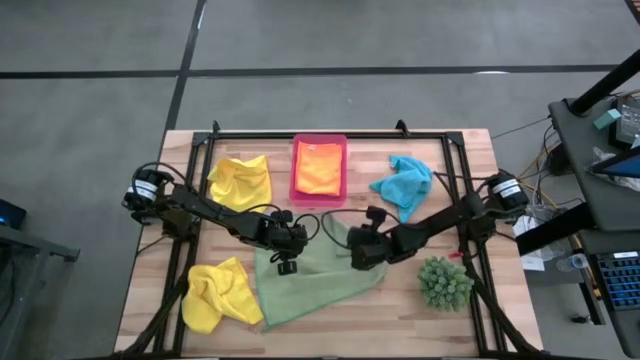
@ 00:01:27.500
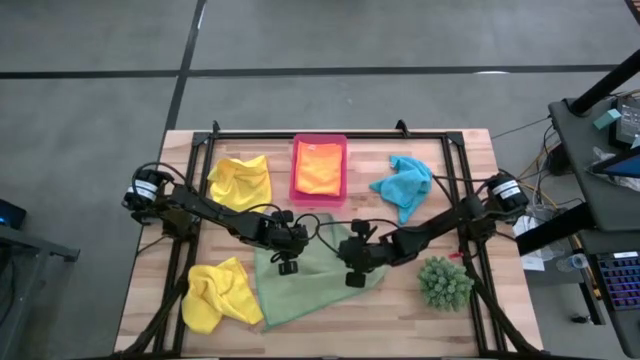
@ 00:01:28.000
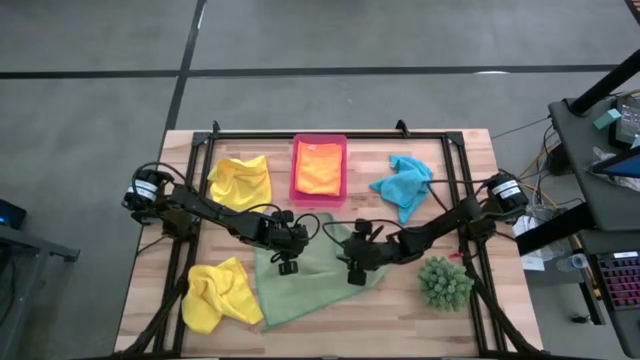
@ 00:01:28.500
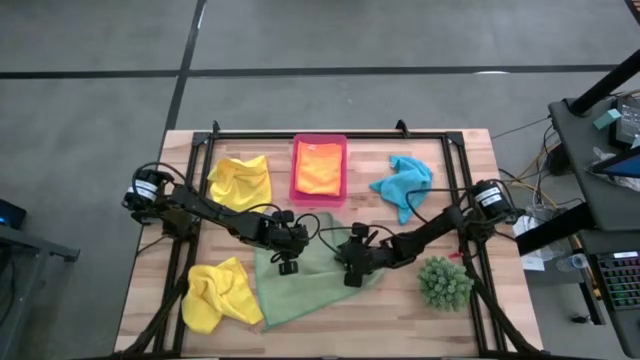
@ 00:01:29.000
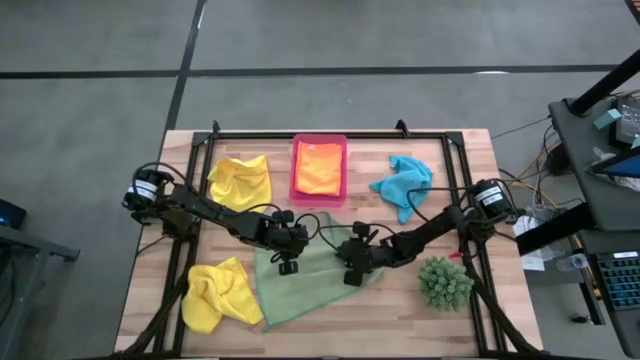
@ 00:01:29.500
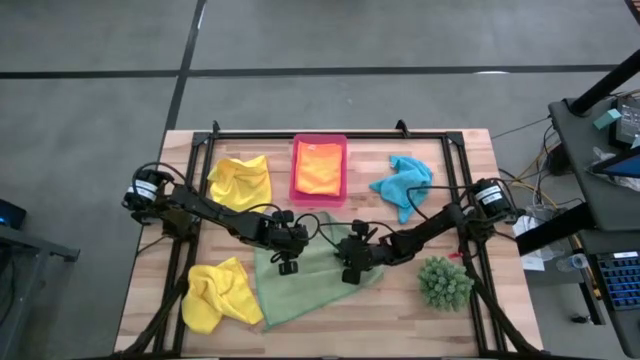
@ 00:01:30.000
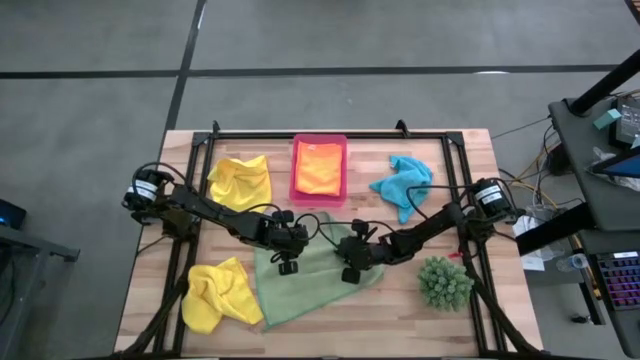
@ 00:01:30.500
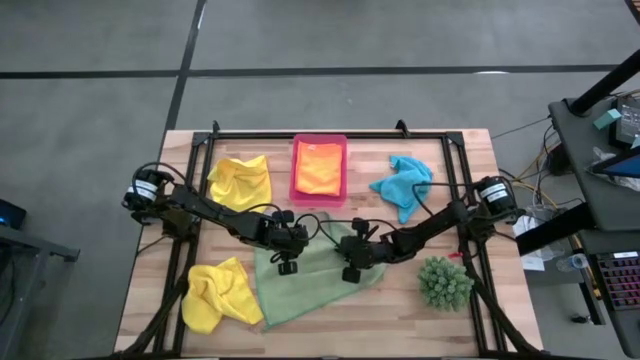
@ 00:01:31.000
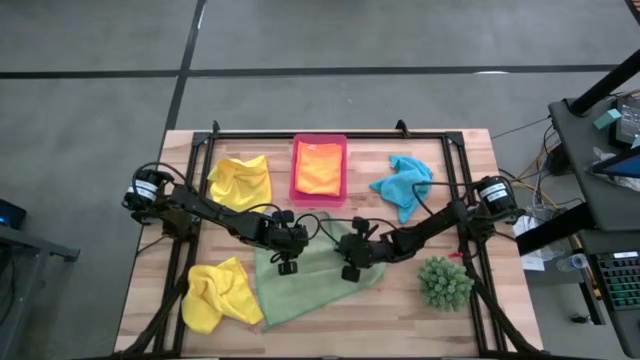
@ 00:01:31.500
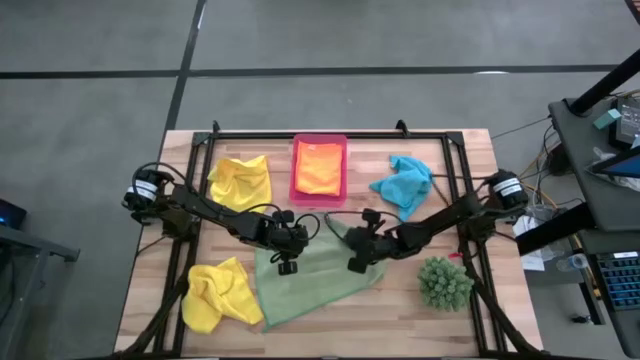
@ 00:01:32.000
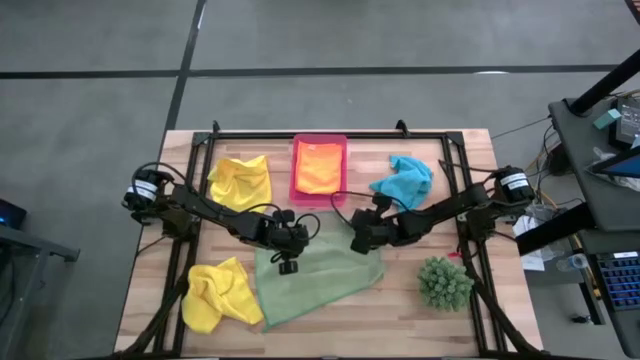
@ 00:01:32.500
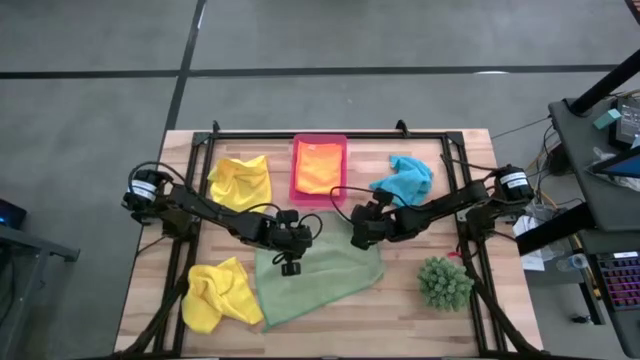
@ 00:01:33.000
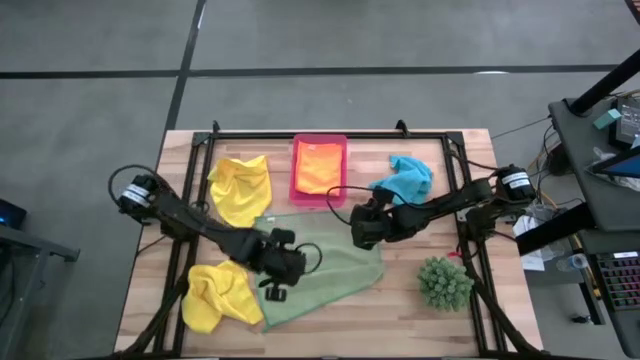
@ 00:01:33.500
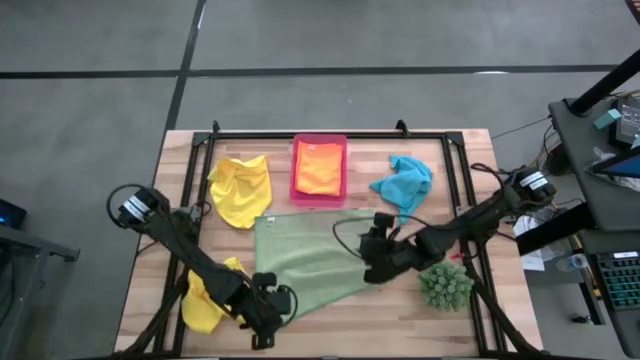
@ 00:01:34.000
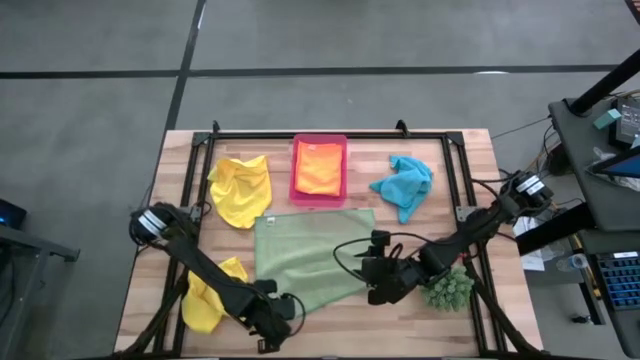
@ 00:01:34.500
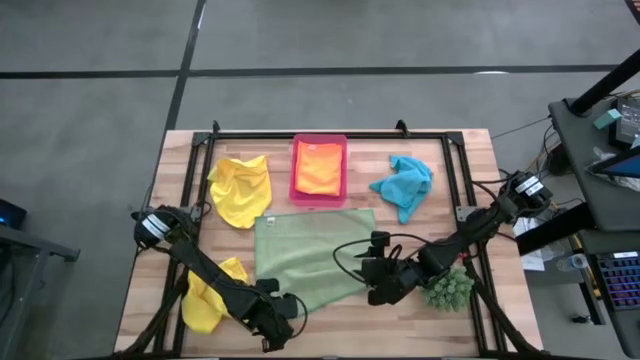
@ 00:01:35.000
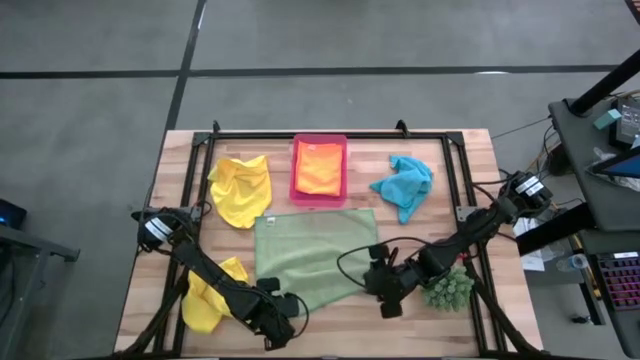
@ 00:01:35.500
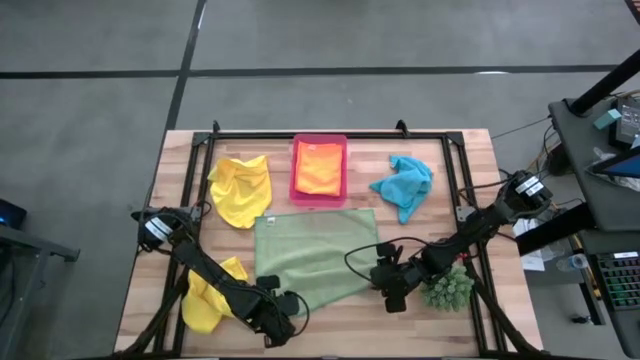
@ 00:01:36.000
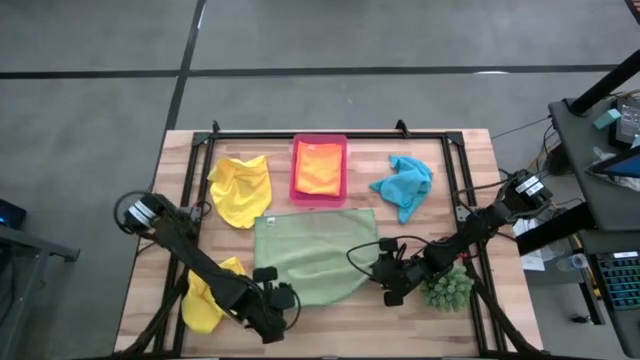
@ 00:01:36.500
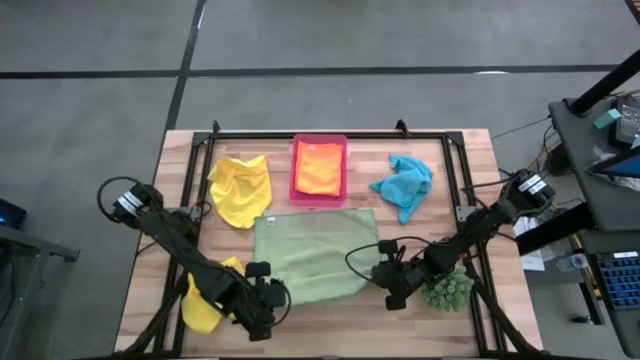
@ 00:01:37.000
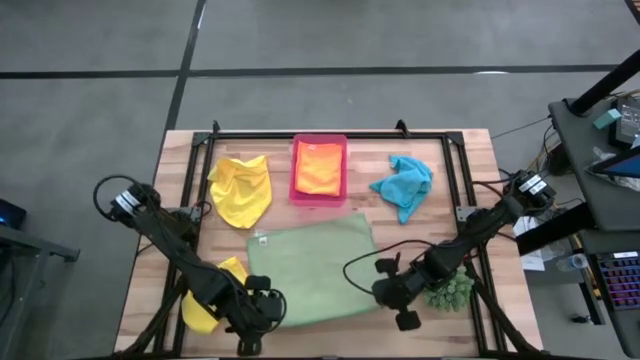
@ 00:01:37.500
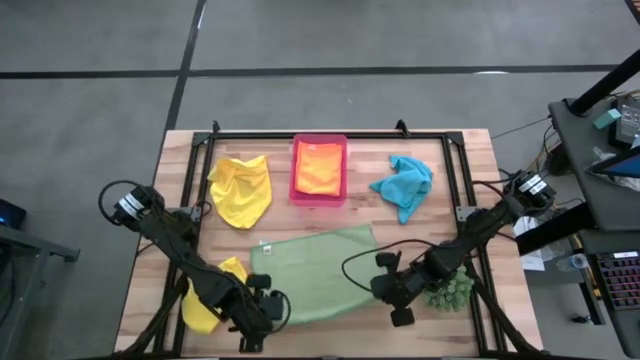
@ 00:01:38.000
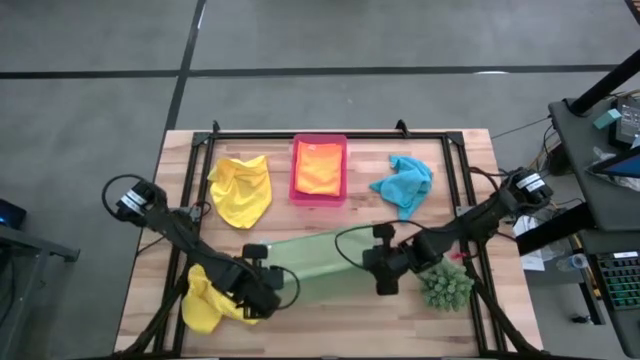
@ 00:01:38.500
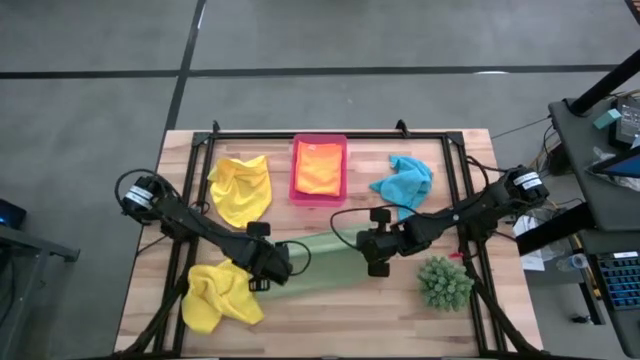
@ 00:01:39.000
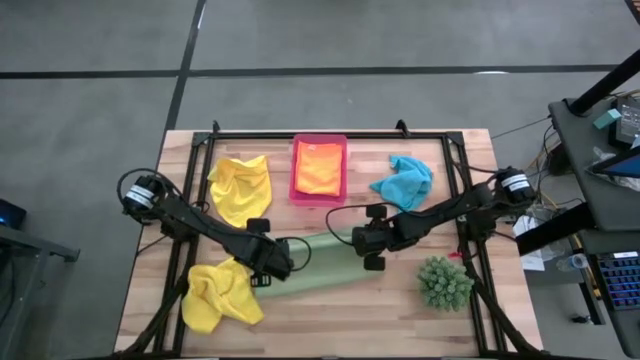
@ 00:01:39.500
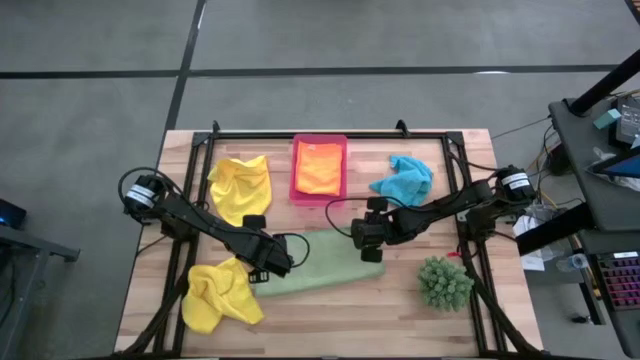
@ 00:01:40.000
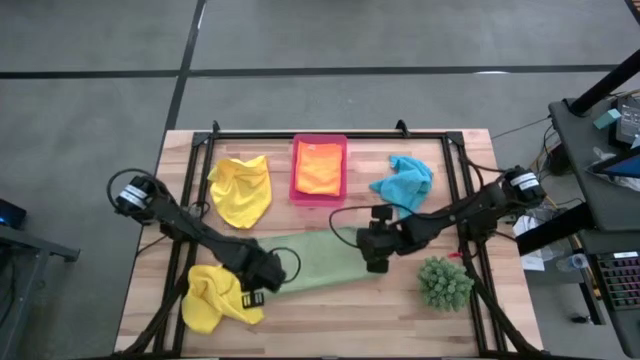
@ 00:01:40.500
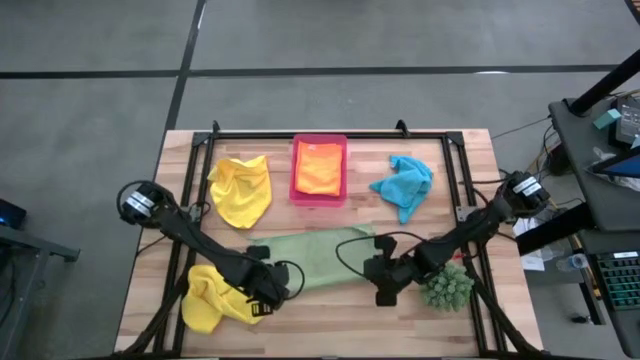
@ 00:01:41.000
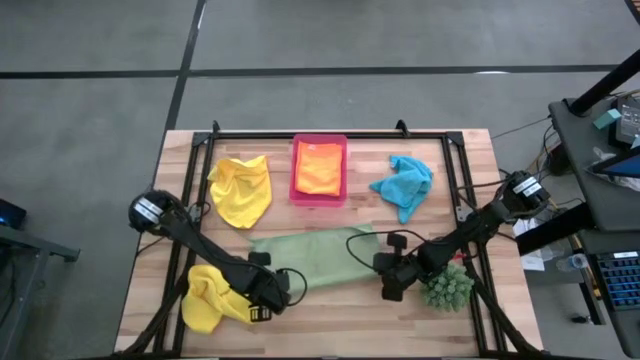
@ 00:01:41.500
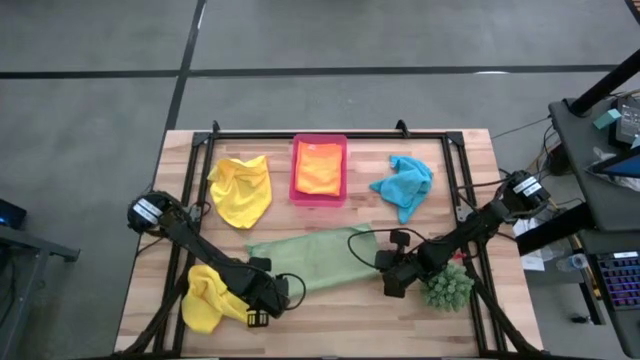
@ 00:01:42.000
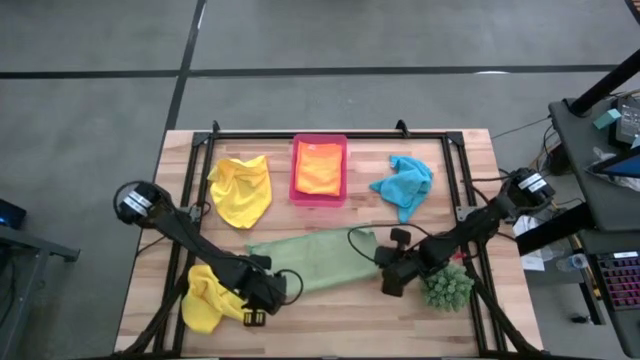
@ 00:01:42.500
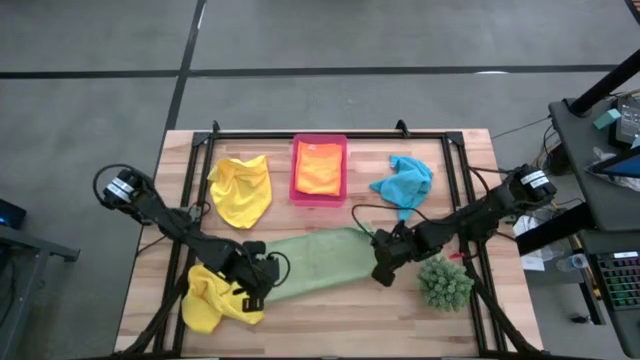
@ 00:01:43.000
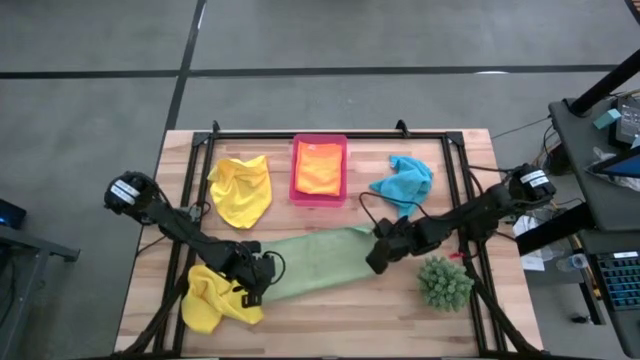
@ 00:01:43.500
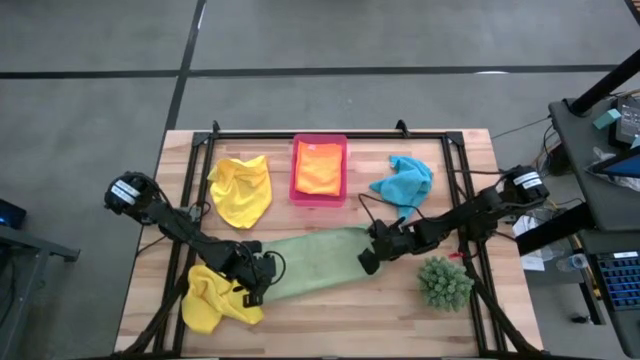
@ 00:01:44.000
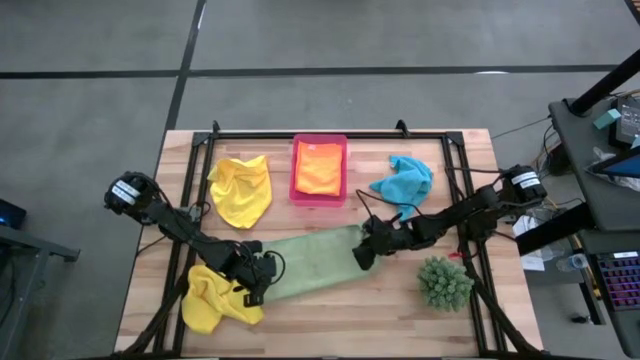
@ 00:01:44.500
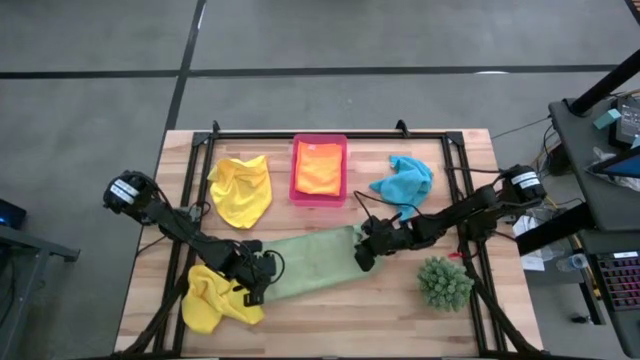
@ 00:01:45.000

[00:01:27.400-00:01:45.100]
Task: Fold microfiber towels
Fold the green towel
